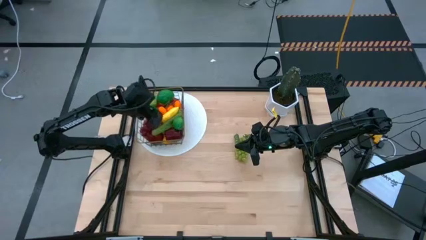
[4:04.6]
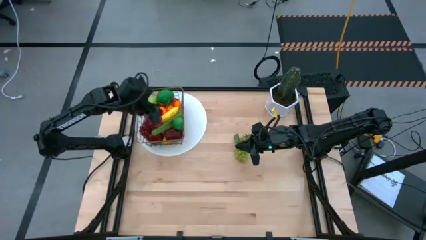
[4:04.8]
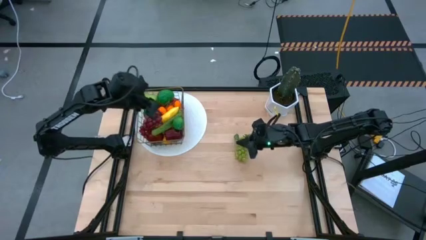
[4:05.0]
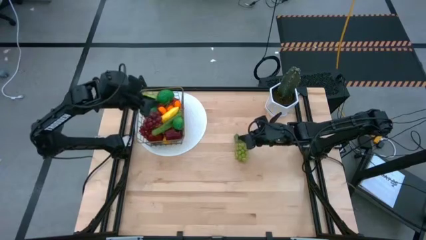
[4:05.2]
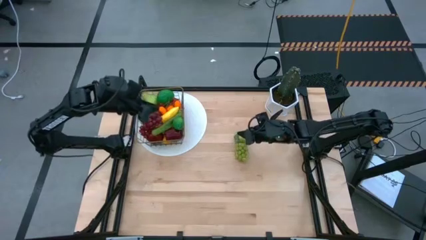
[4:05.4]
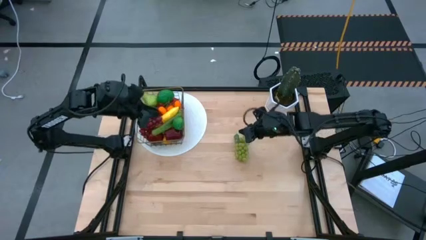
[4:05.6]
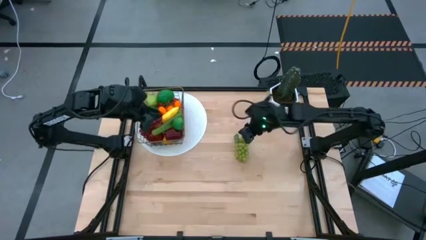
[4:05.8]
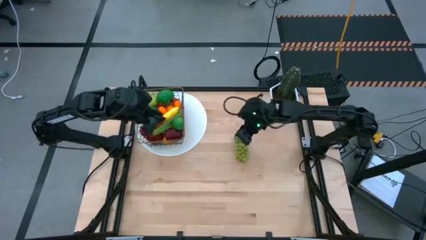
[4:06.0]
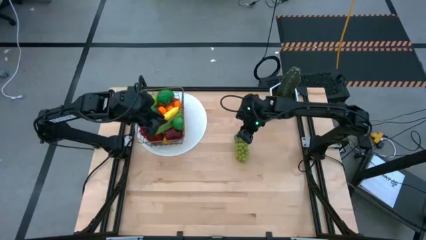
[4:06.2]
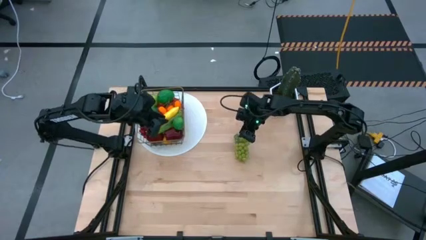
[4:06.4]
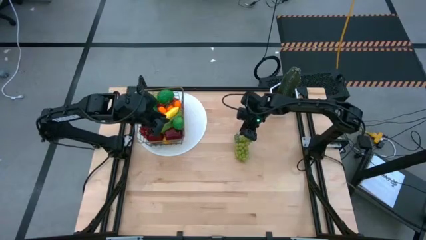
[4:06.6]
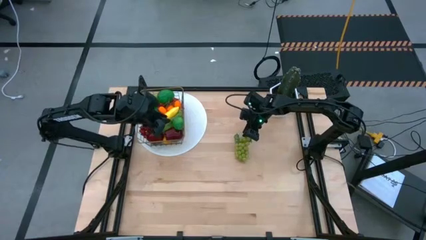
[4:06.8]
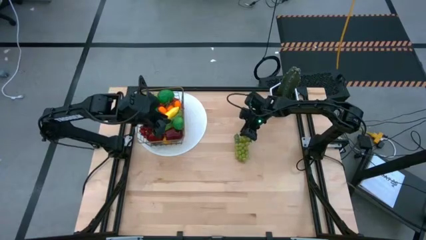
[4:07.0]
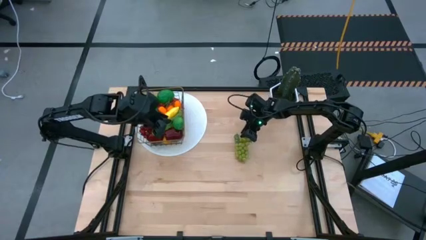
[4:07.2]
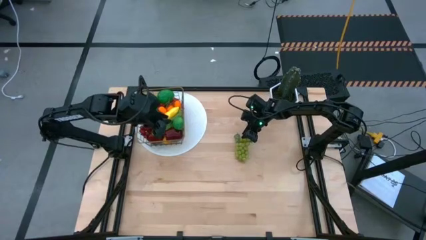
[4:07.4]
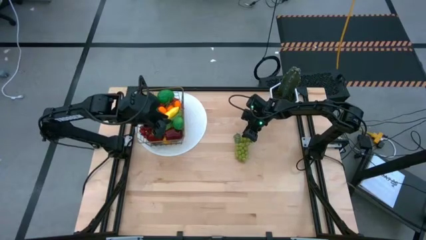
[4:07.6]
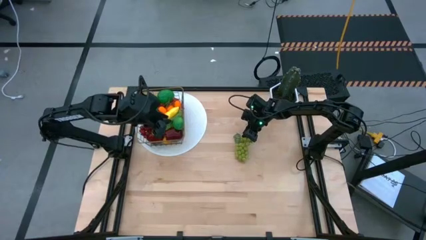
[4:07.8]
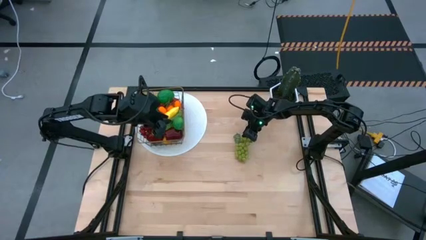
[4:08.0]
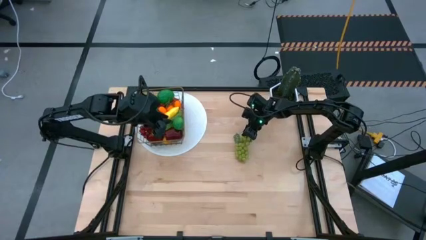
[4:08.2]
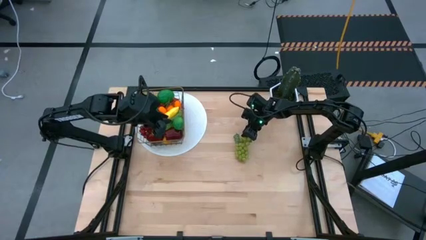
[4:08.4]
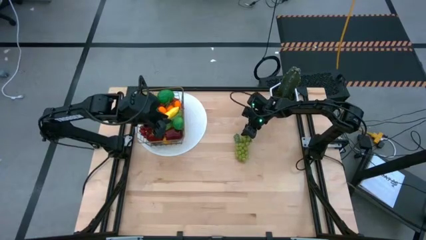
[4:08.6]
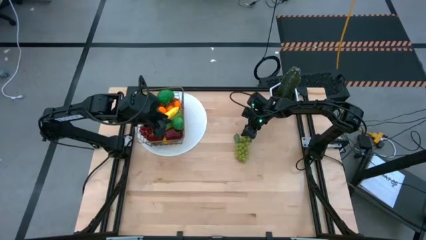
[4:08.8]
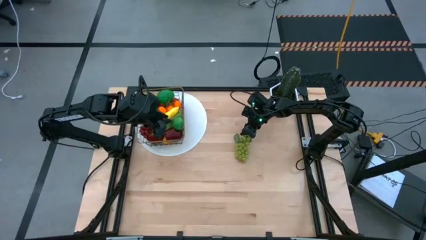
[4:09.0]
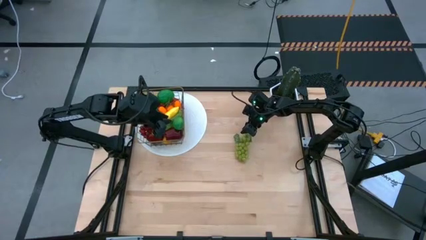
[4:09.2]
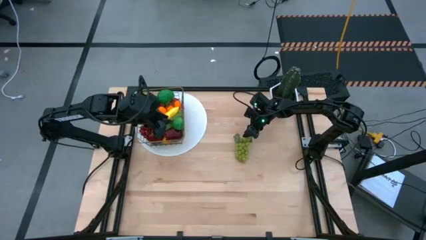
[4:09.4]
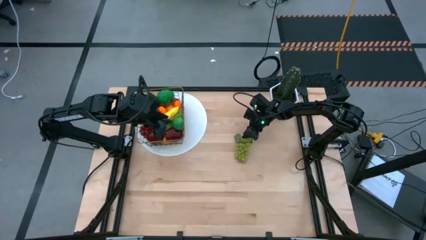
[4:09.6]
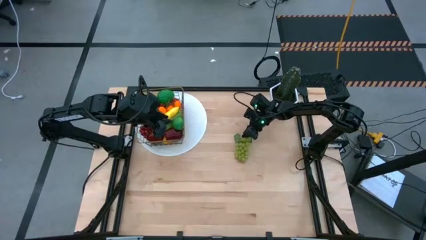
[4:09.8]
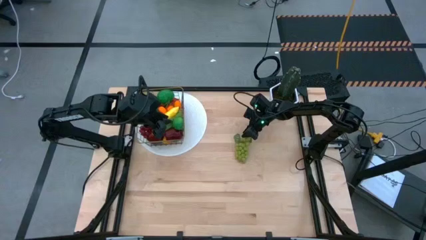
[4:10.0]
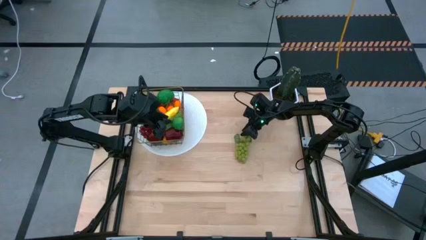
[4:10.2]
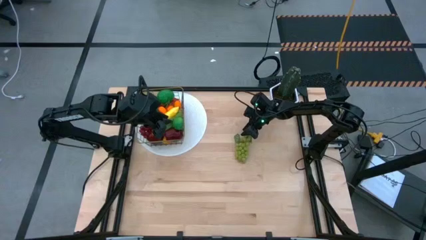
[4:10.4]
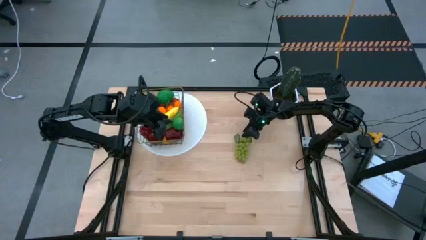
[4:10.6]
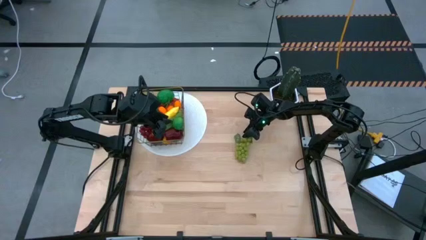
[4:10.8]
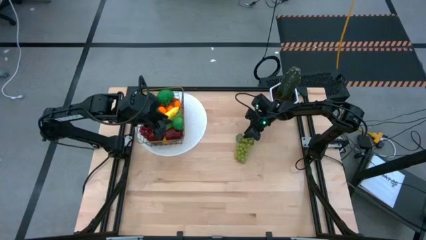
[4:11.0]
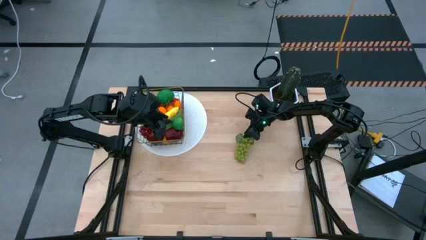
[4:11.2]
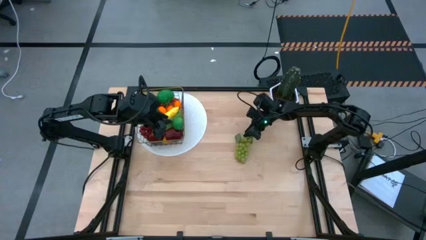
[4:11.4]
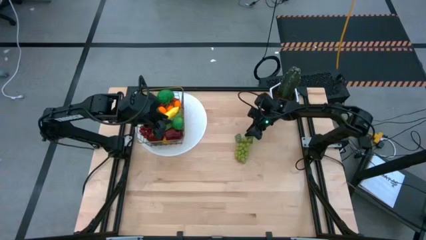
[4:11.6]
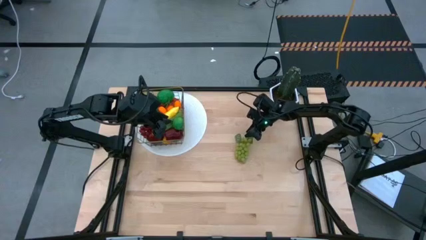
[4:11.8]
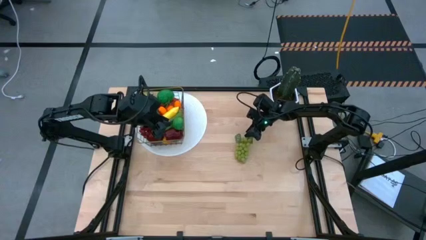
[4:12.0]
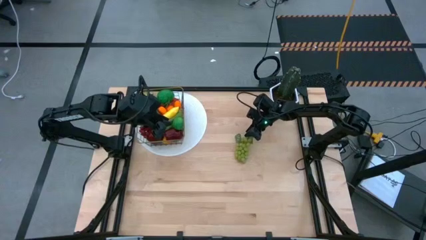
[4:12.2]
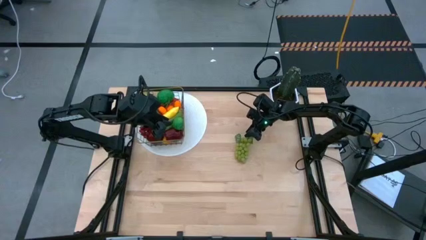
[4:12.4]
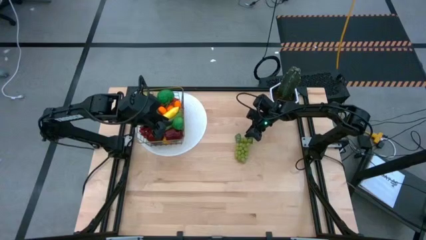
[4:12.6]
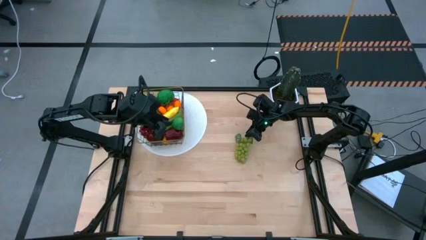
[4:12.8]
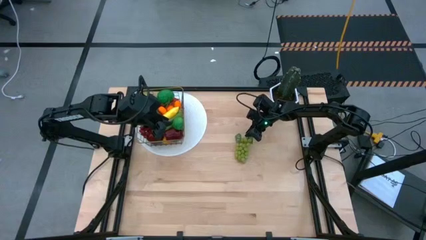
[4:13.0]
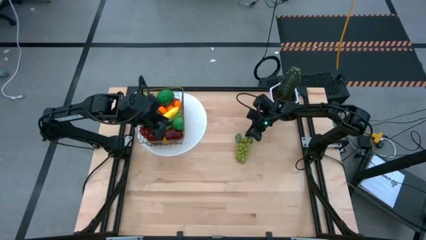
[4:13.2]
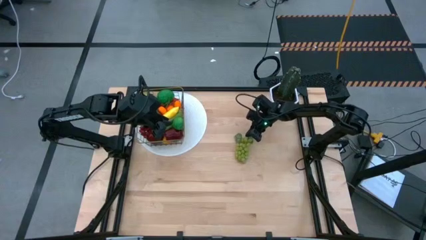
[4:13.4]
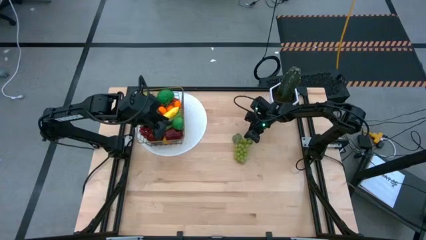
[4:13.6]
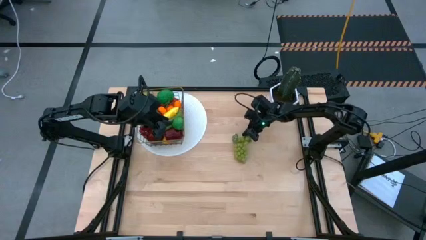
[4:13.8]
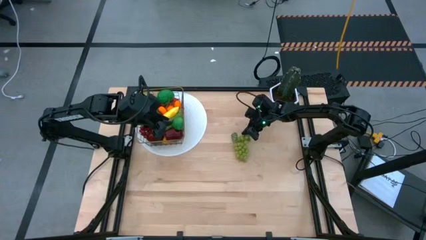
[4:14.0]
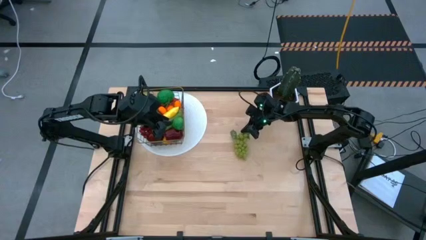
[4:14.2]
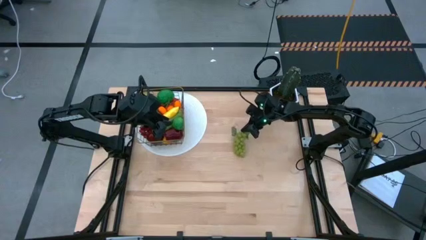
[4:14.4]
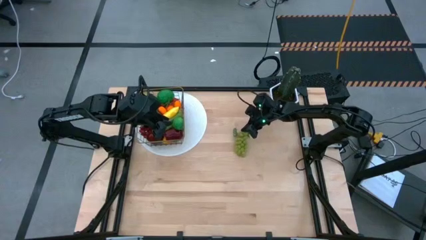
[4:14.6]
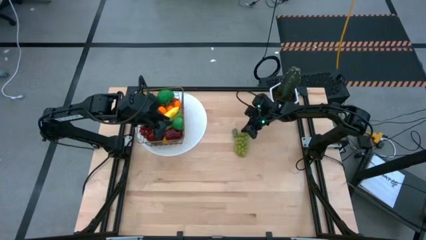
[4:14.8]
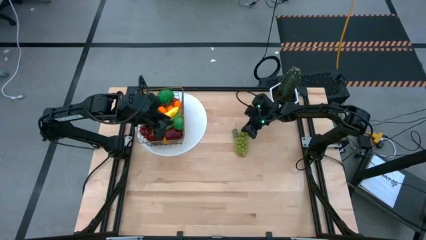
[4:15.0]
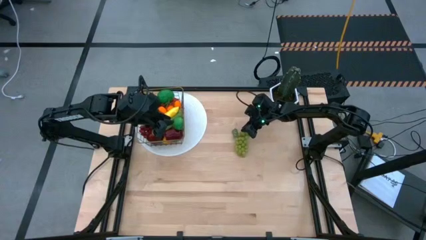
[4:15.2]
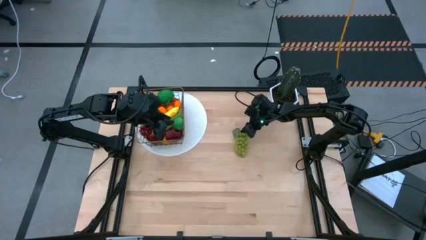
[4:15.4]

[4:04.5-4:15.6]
Task: Build produce basket
Put the green grapes into the wire basket

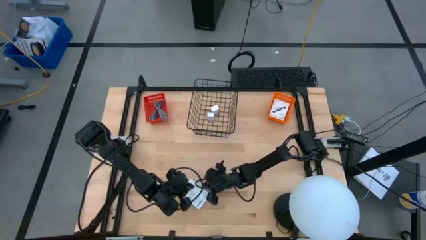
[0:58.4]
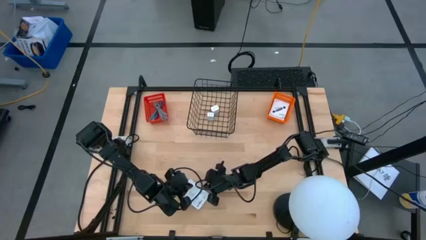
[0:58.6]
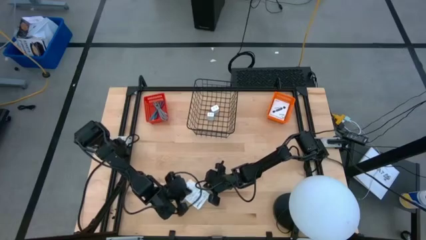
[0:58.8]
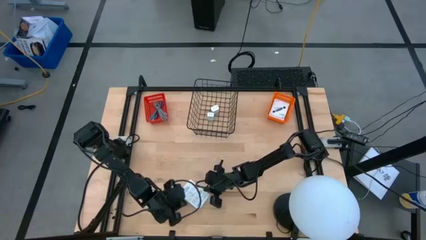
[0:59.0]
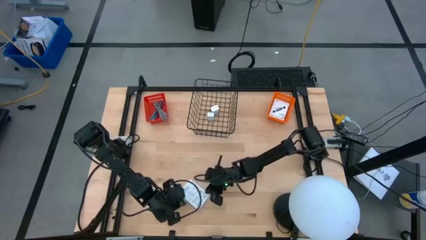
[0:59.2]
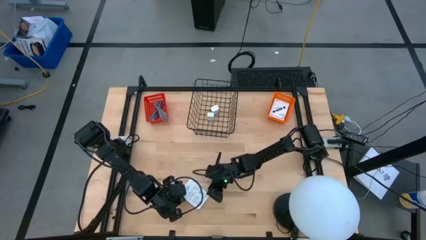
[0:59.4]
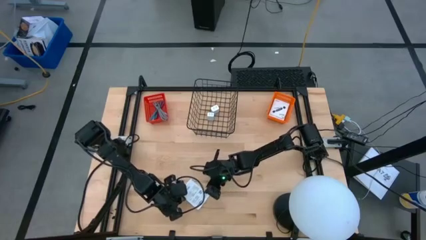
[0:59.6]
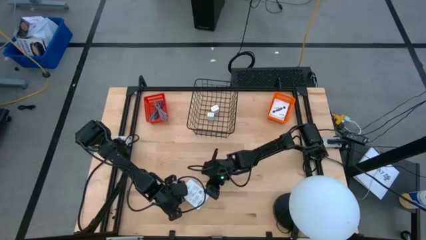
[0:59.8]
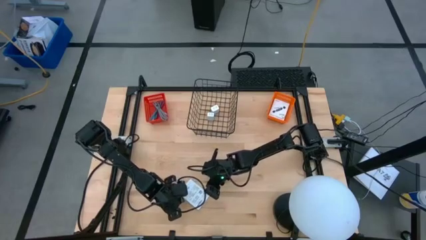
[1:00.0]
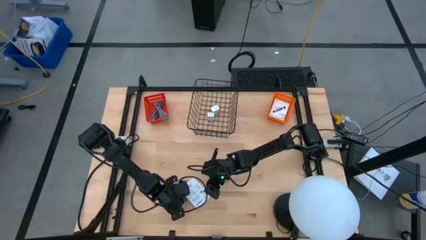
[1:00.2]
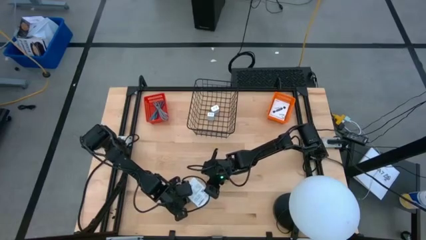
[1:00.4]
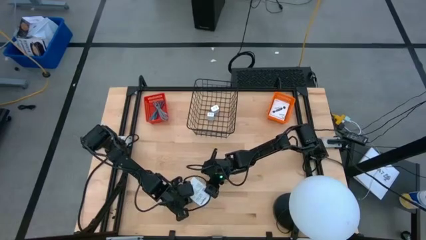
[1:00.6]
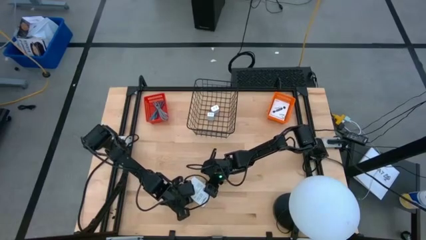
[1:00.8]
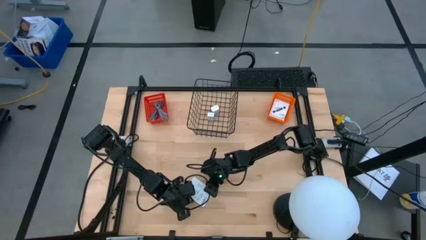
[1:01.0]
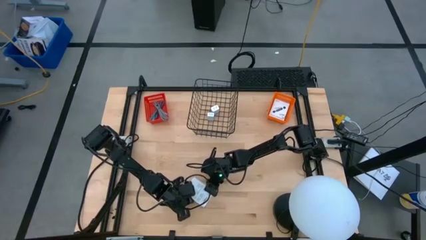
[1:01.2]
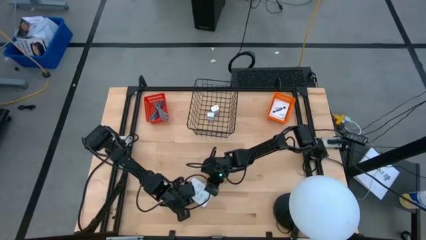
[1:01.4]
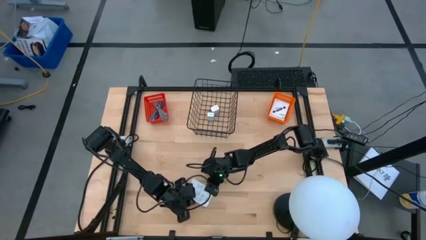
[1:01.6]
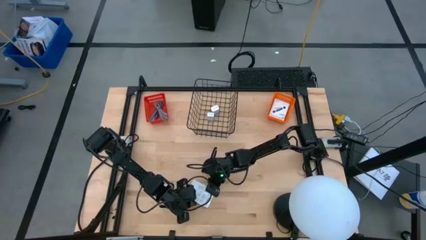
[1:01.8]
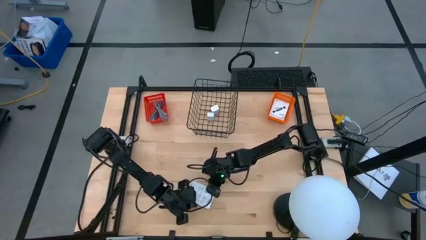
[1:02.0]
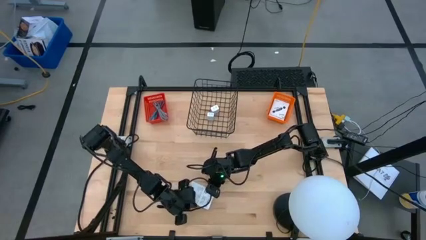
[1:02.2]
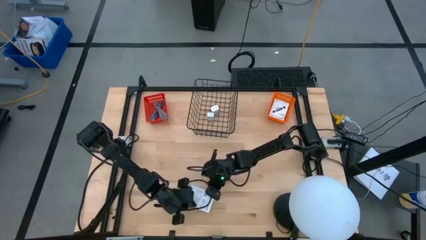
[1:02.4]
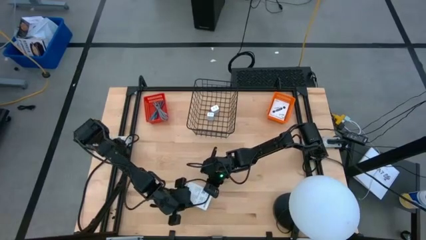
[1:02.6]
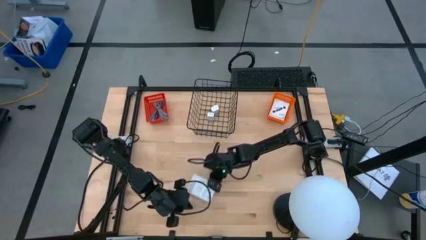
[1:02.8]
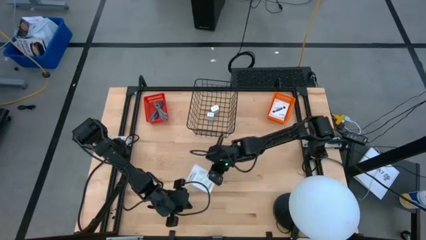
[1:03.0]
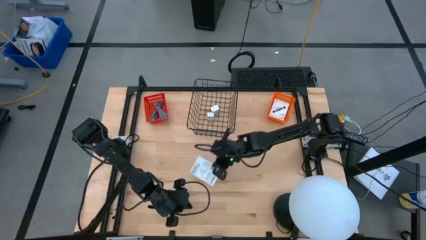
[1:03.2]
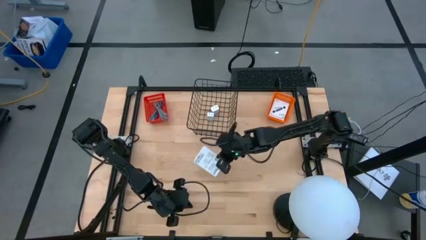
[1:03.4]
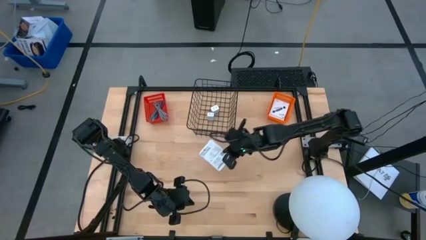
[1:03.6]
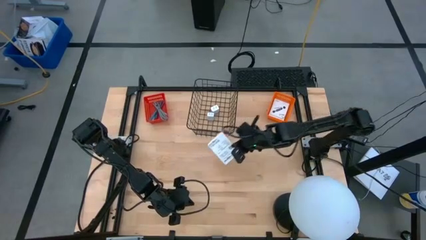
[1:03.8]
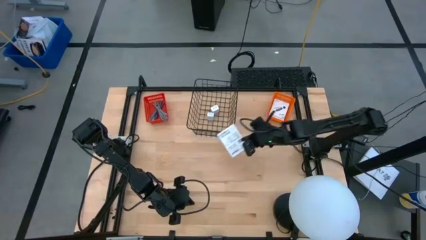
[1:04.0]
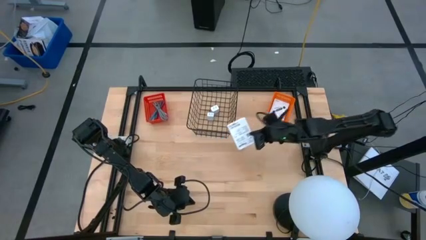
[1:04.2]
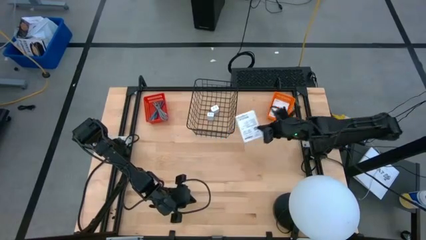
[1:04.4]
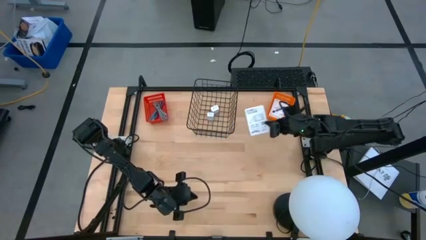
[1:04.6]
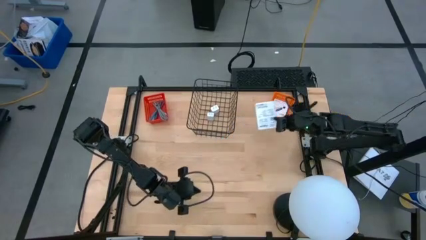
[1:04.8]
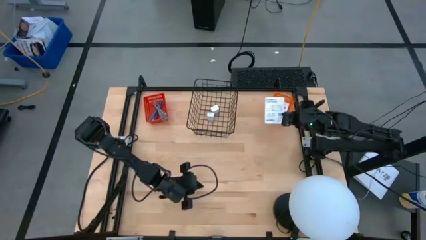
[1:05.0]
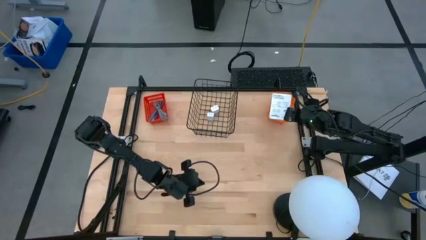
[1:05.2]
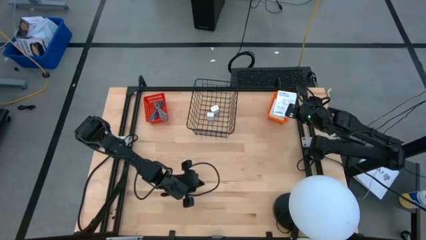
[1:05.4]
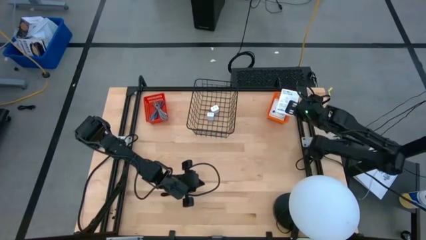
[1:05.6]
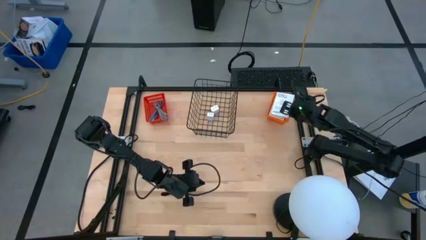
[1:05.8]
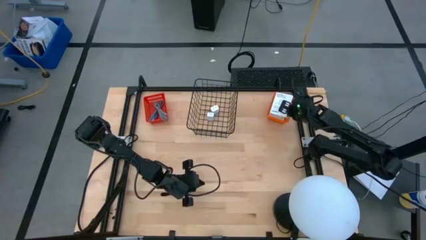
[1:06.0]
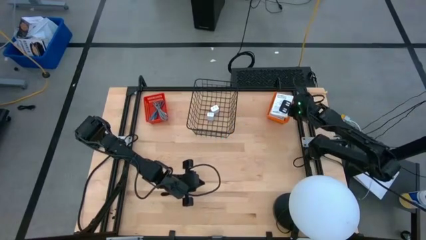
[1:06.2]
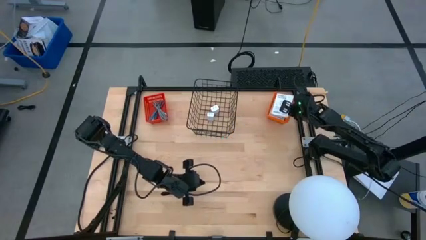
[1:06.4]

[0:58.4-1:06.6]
Task: Pick and place items into bin
Put the card reader box into the orange basket
